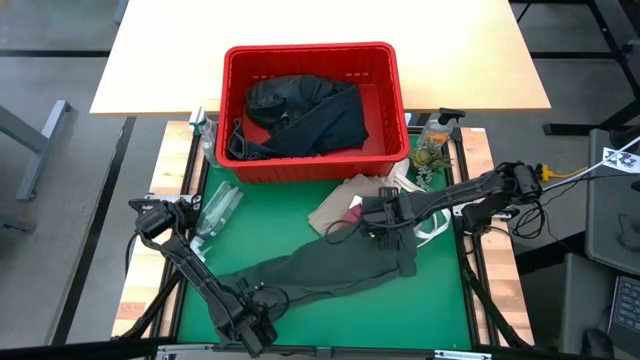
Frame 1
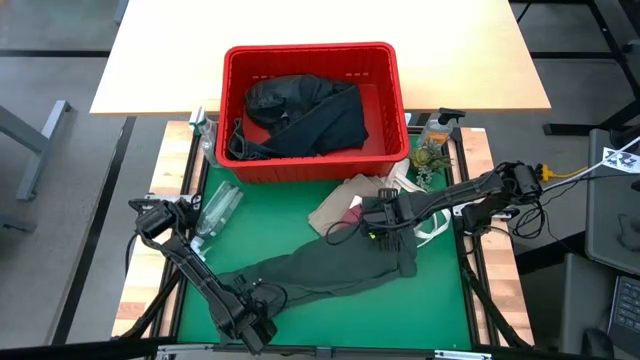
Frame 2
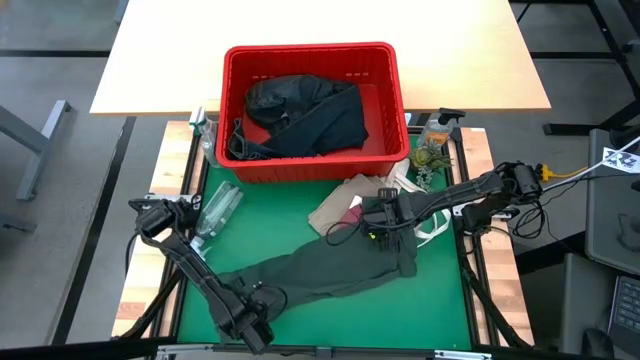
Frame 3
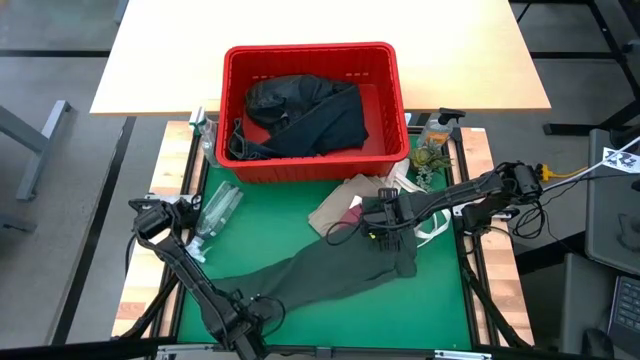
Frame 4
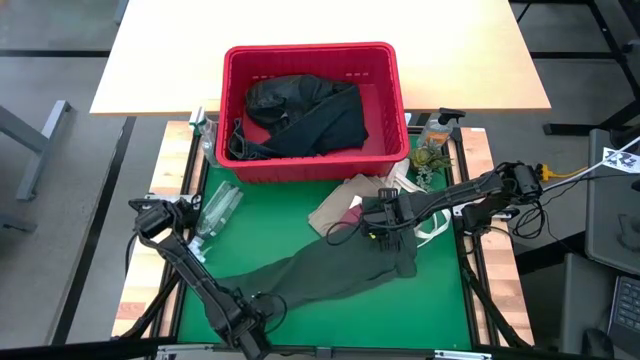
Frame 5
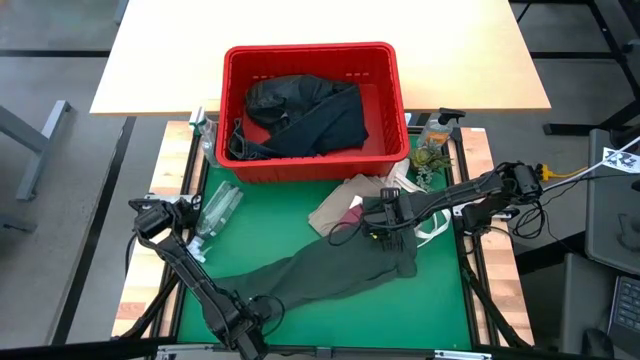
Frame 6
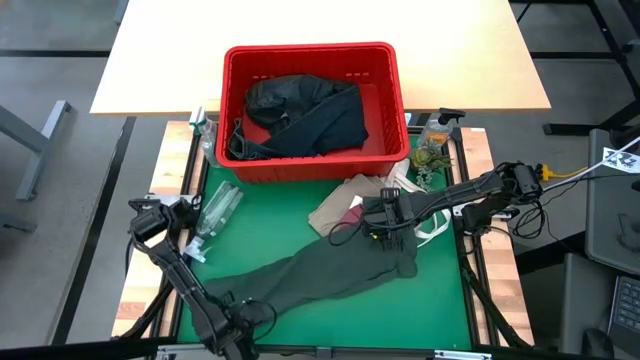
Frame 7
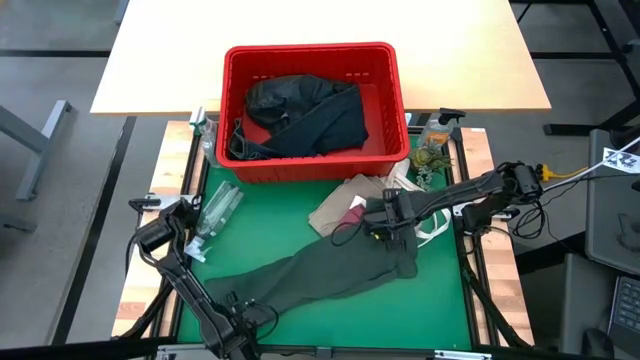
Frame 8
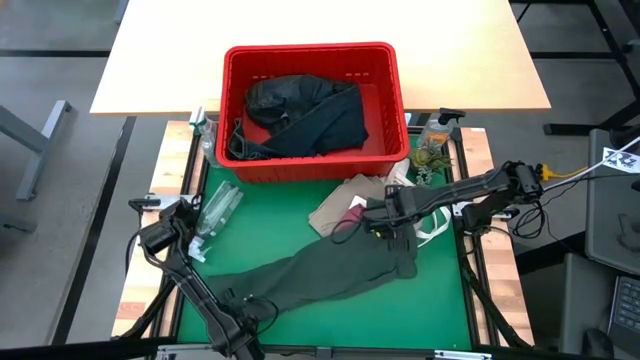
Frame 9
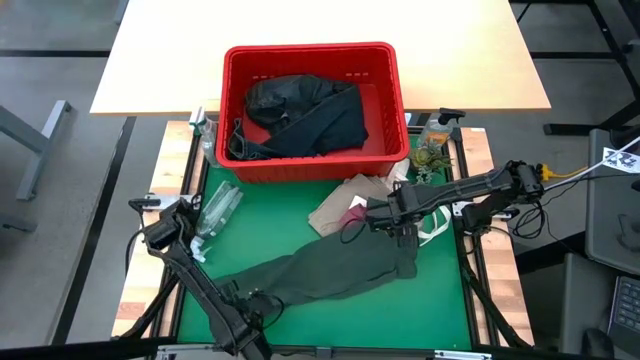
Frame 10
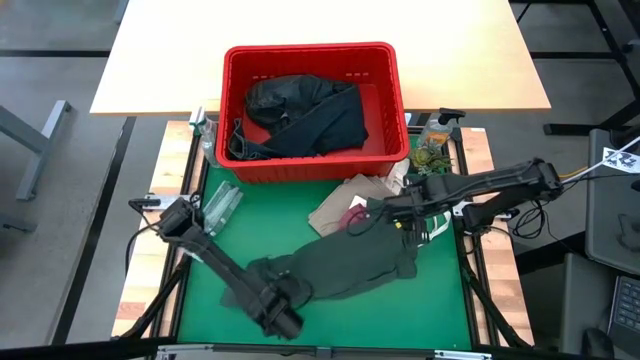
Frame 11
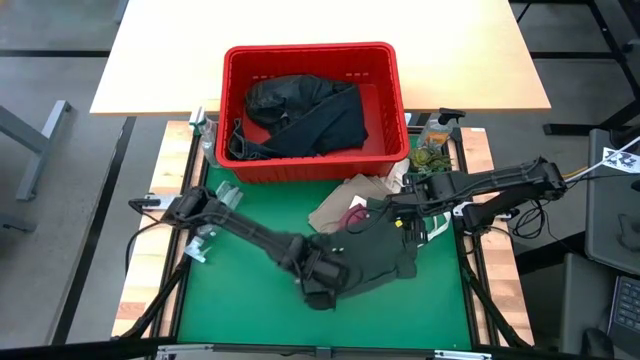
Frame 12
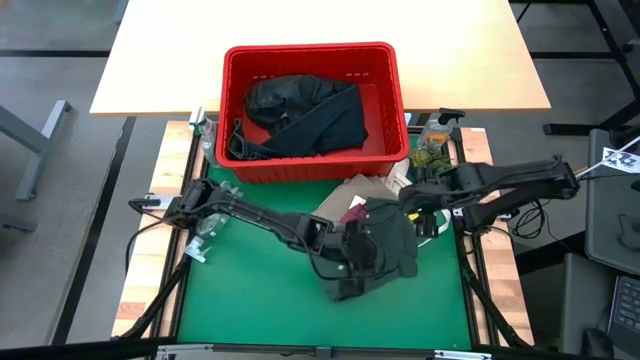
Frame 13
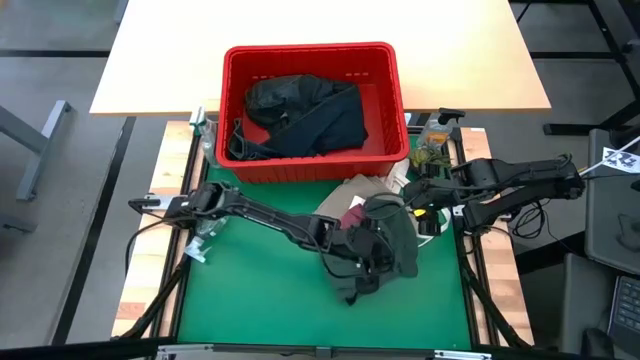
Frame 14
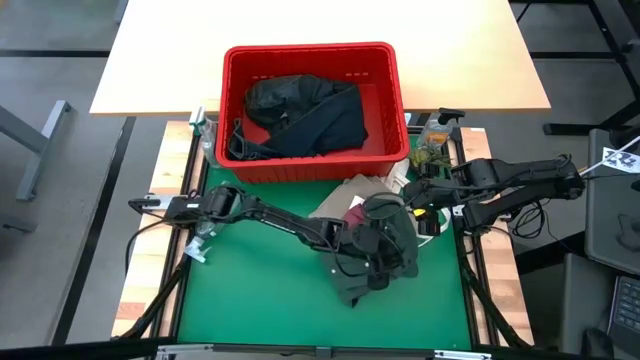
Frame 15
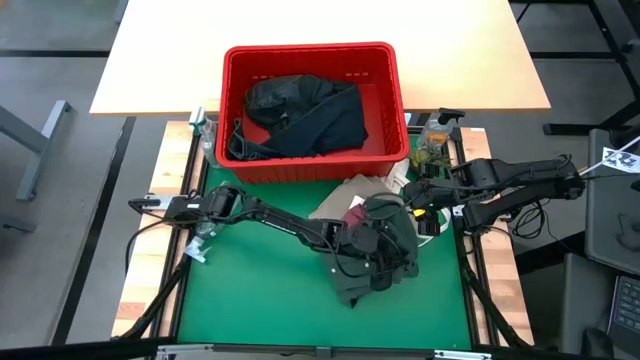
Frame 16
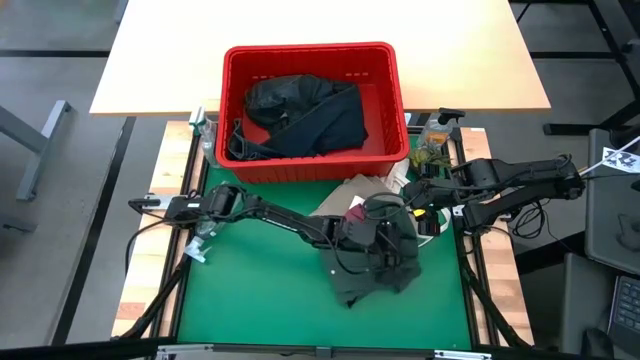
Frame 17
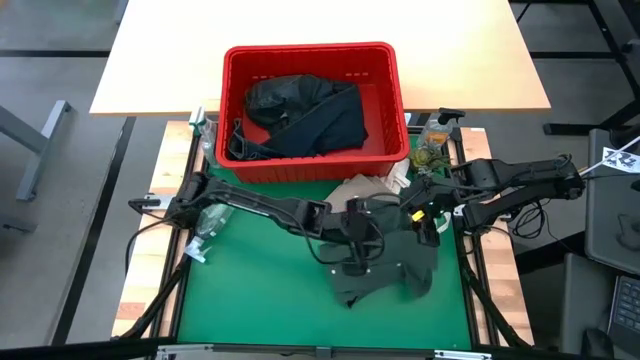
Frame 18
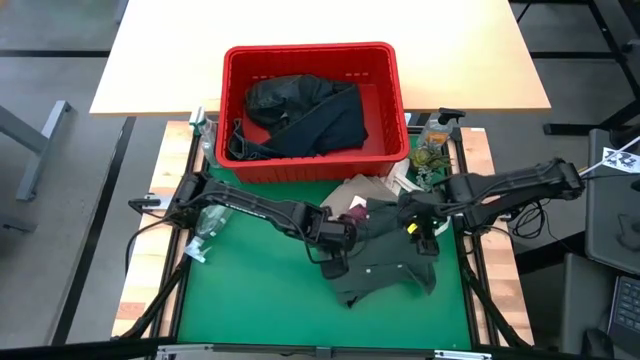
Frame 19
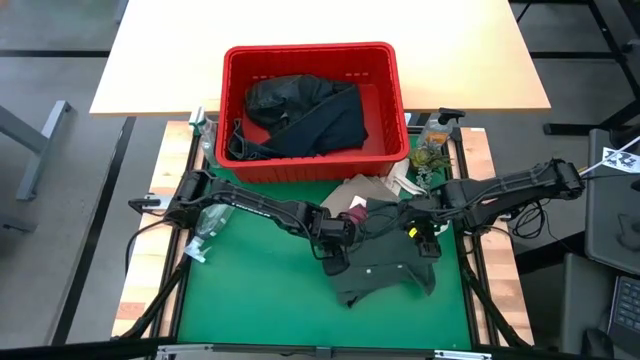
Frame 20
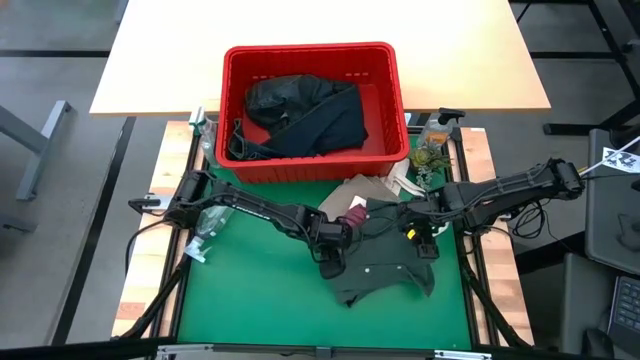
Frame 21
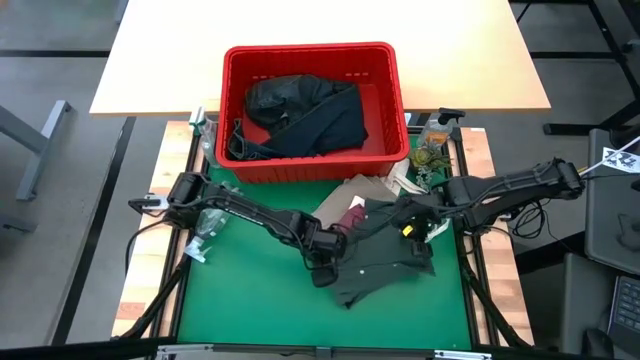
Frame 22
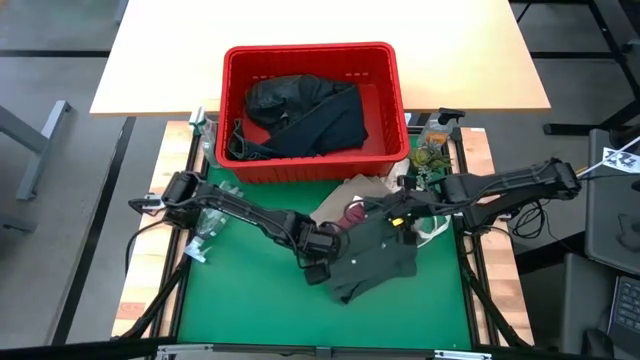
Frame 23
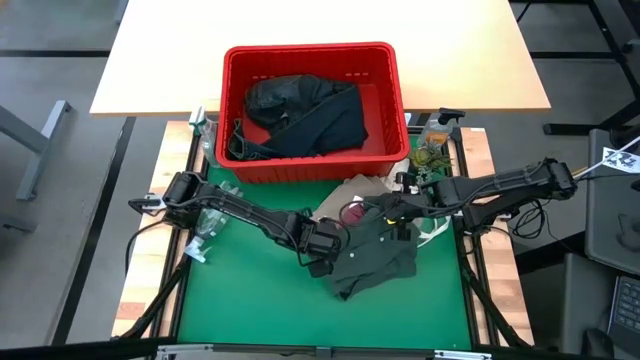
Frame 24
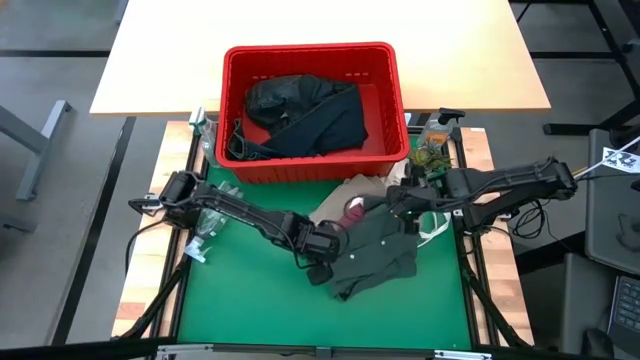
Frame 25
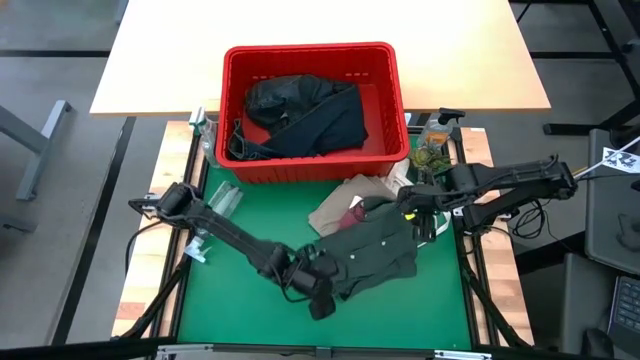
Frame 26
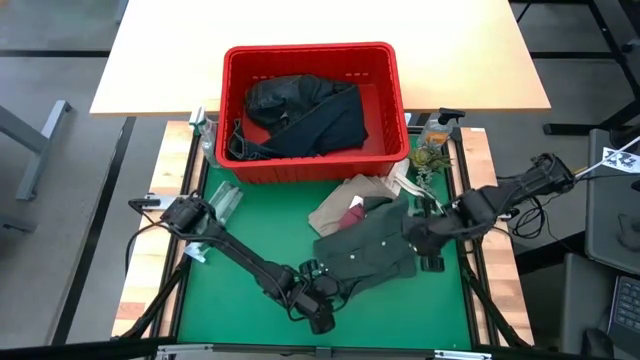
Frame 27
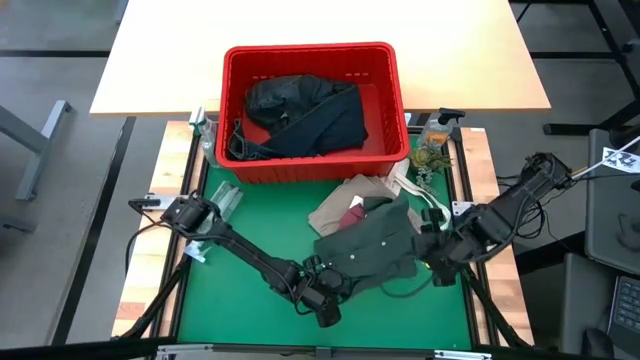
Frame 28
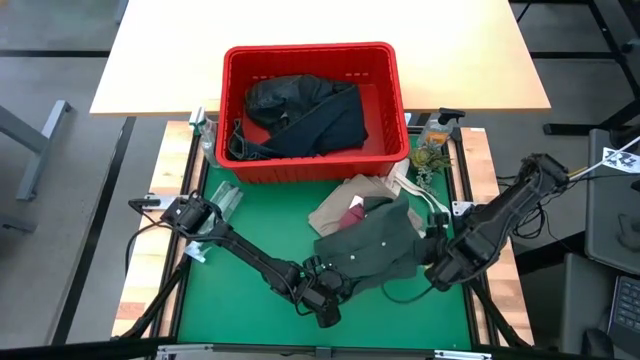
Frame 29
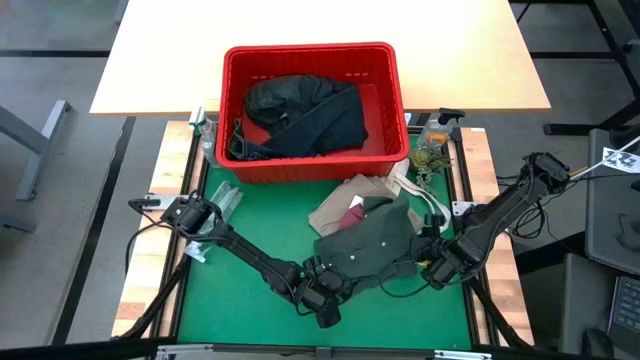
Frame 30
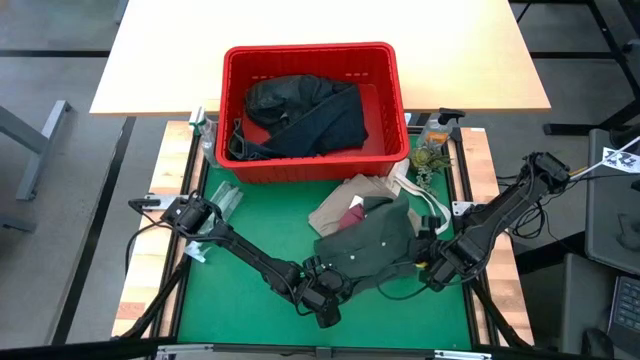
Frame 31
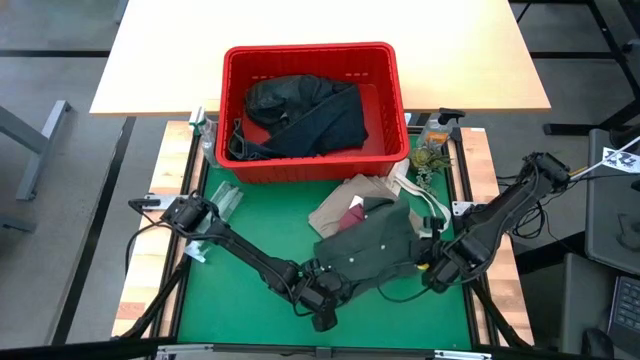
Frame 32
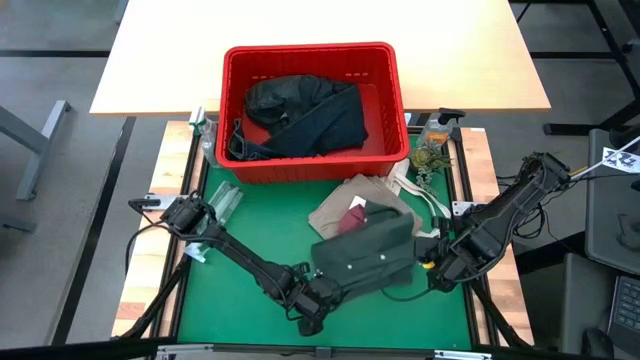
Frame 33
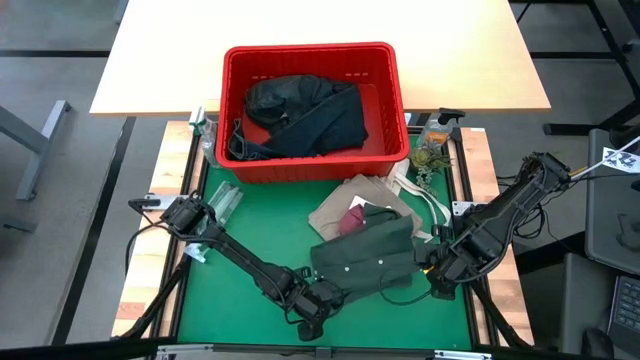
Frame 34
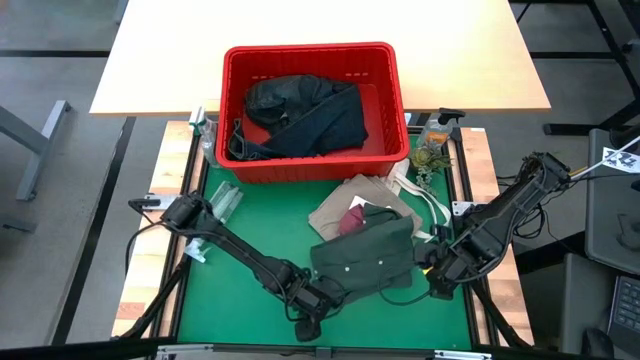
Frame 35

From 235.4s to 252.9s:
Task: Fold laundry
Fold the green polo shirt

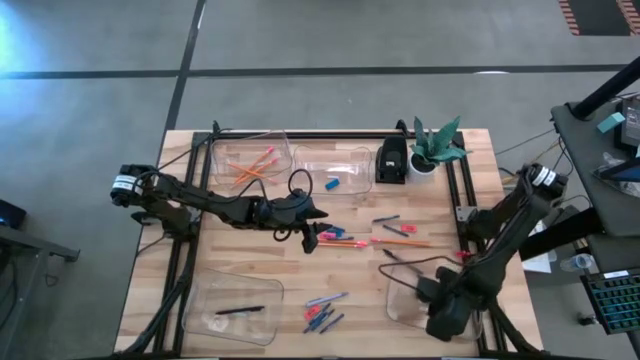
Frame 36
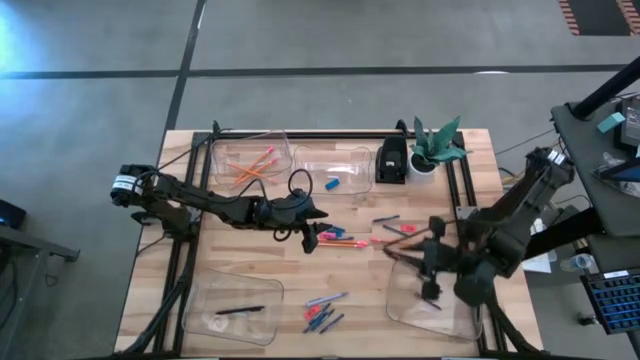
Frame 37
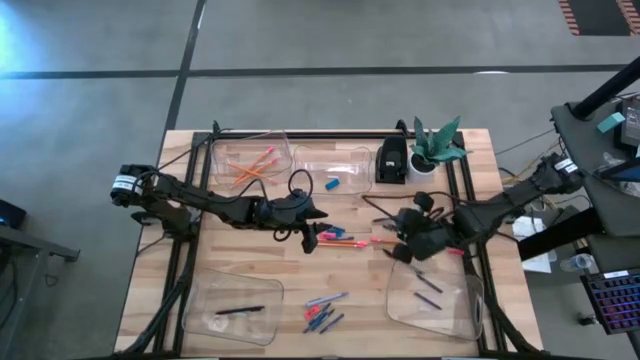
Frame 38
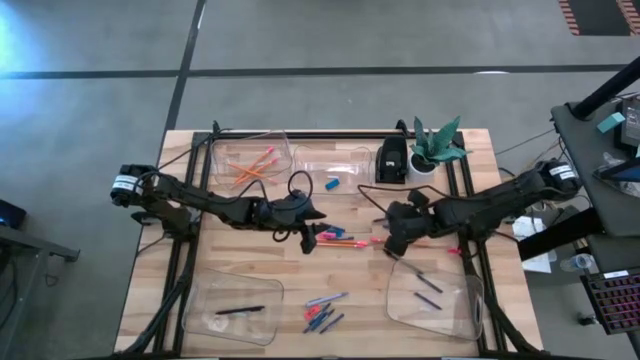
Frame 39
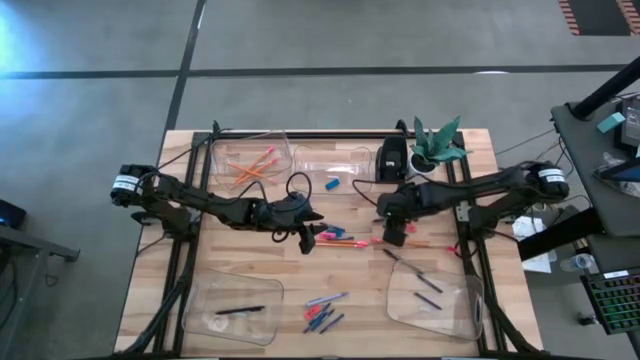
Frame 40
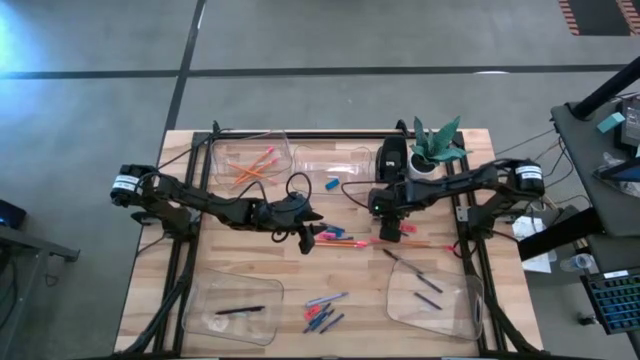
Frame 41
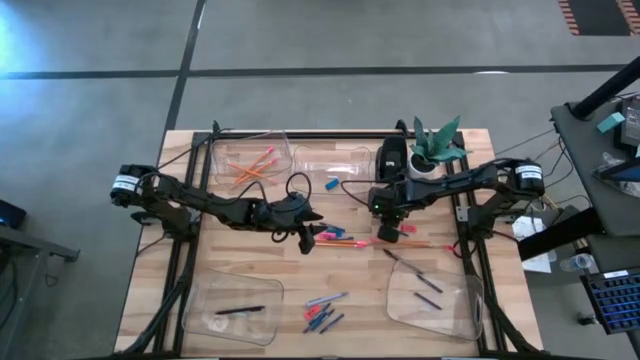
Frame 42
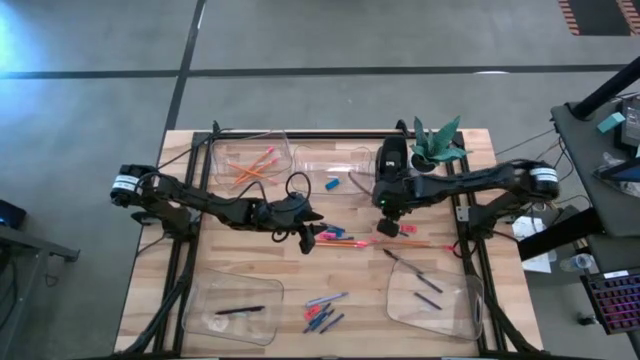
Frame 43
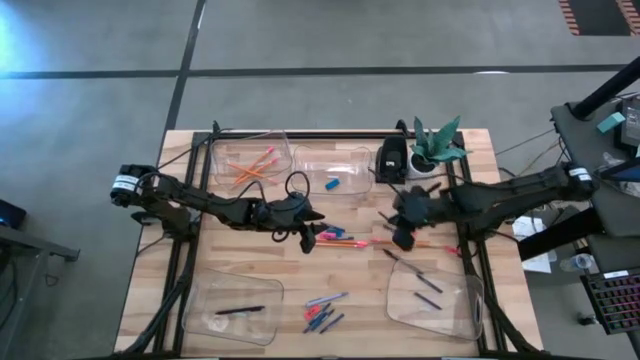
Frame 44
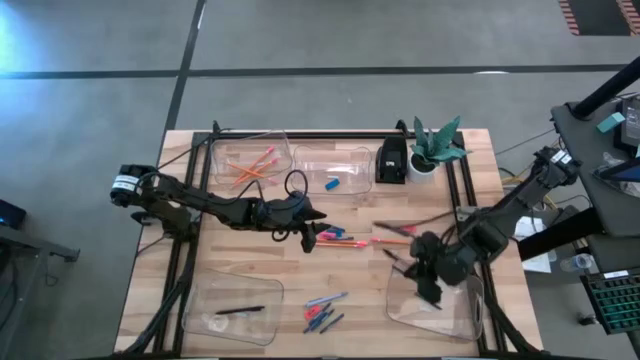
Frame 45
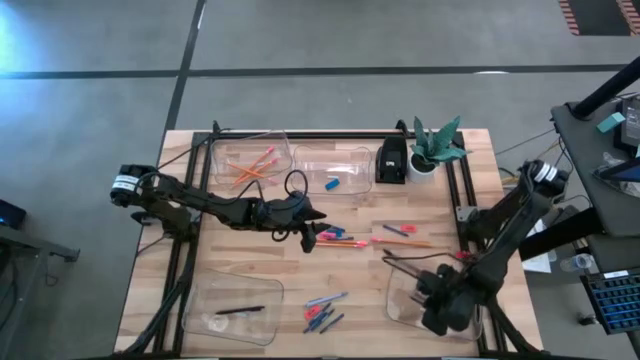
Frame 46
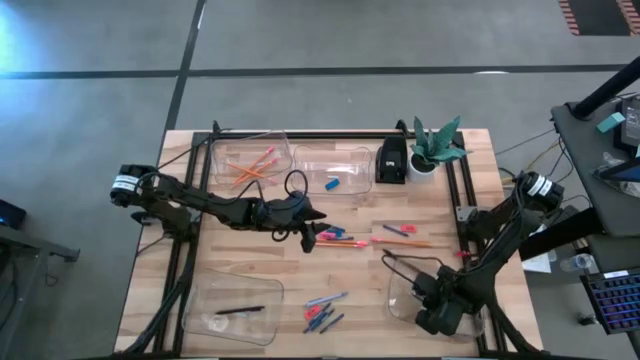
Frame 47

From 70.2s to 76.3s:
Task: Sort crayons/erasers/pens/pencils in bins
Put the dark blue crayon into the bottom right transparent bin
